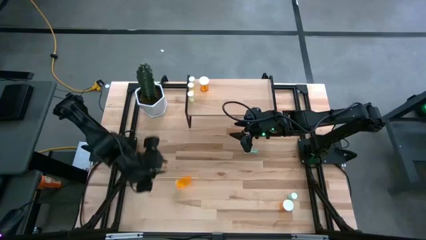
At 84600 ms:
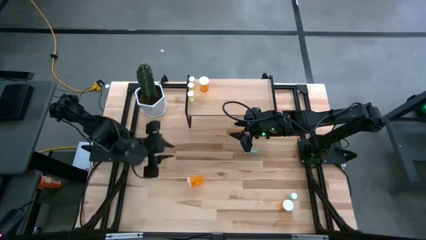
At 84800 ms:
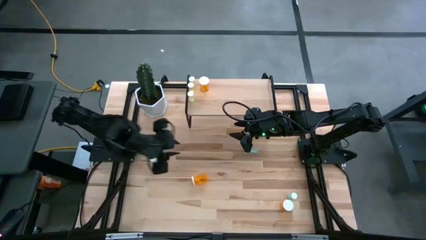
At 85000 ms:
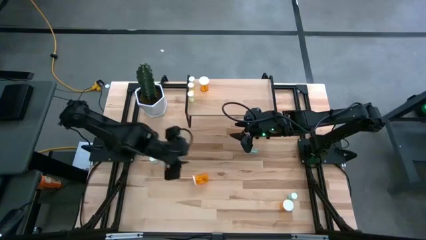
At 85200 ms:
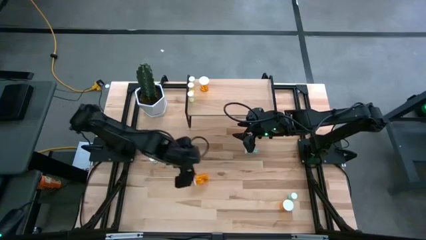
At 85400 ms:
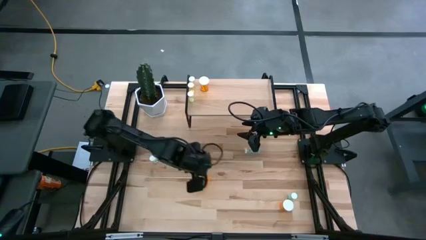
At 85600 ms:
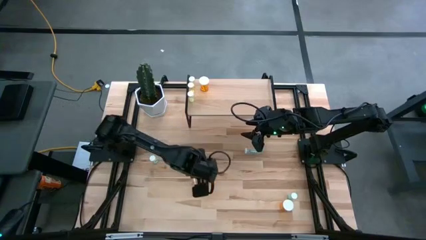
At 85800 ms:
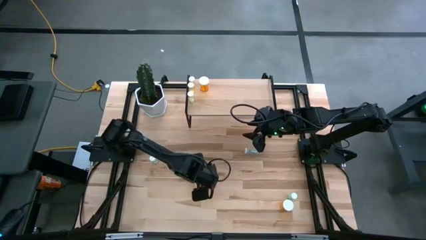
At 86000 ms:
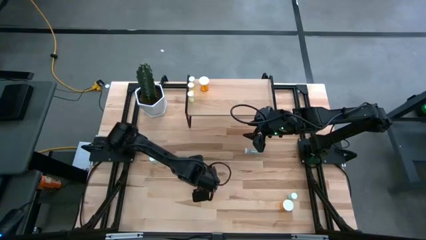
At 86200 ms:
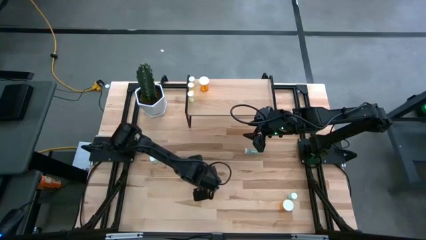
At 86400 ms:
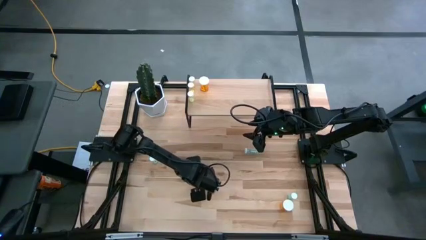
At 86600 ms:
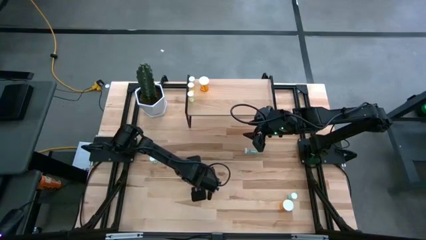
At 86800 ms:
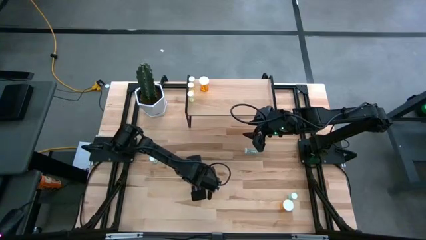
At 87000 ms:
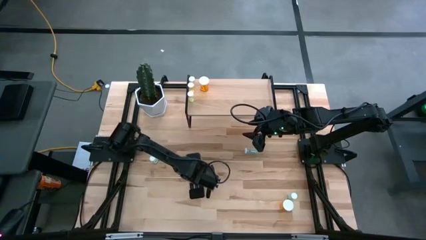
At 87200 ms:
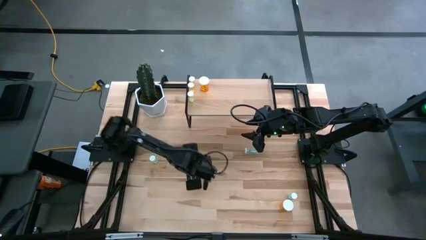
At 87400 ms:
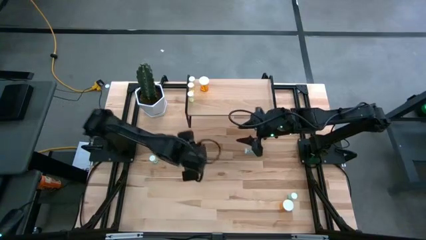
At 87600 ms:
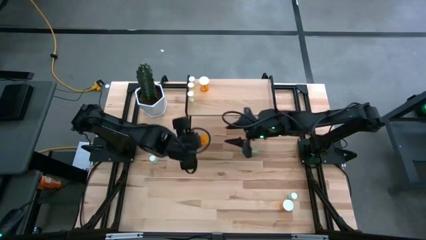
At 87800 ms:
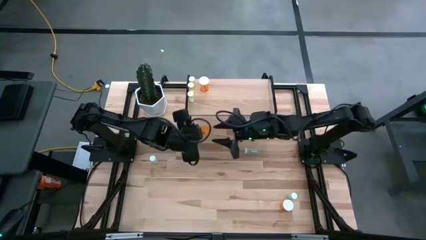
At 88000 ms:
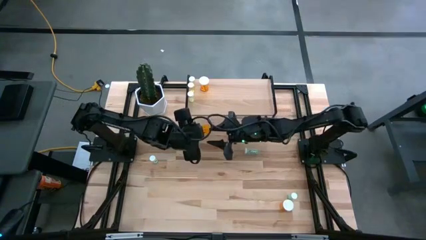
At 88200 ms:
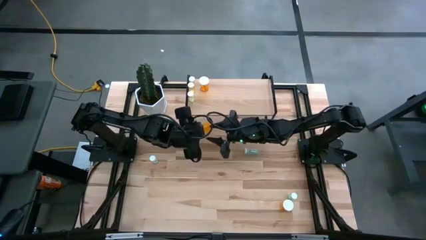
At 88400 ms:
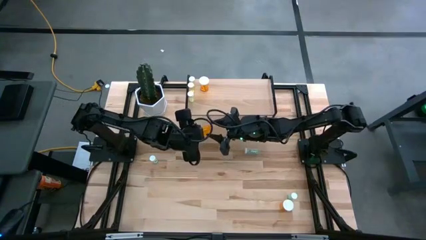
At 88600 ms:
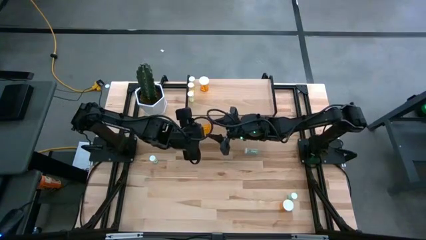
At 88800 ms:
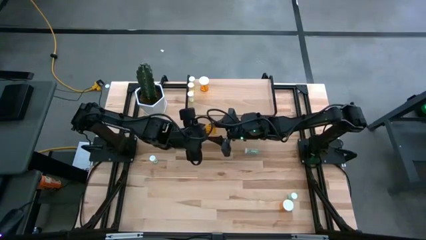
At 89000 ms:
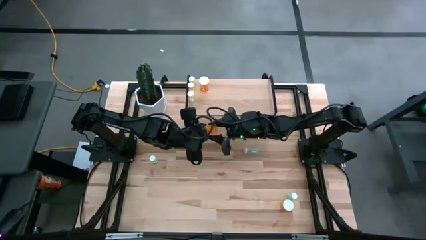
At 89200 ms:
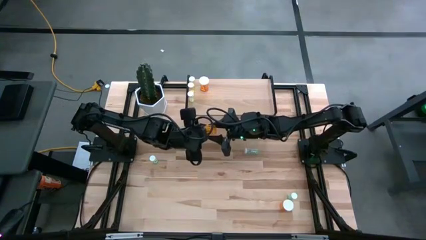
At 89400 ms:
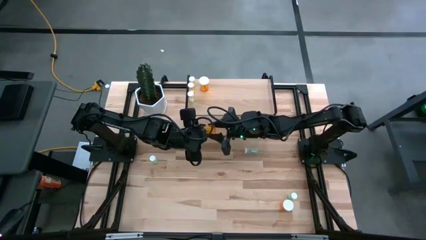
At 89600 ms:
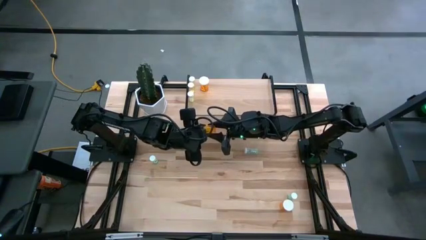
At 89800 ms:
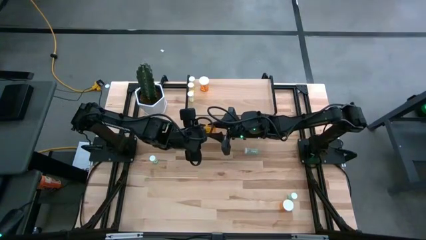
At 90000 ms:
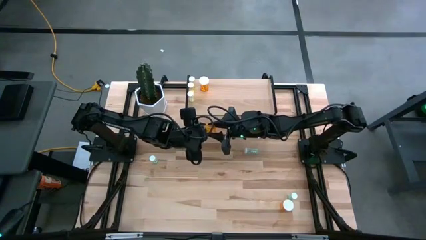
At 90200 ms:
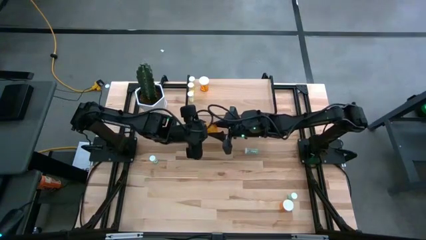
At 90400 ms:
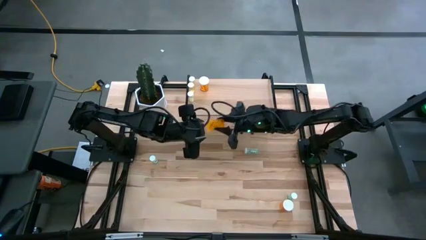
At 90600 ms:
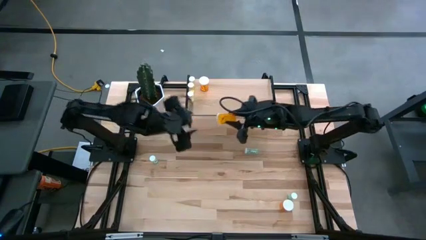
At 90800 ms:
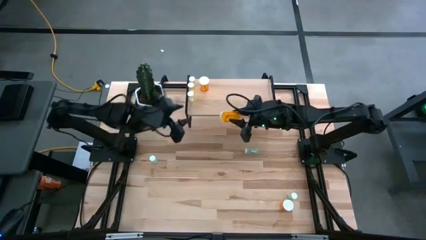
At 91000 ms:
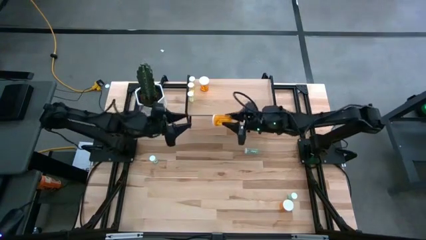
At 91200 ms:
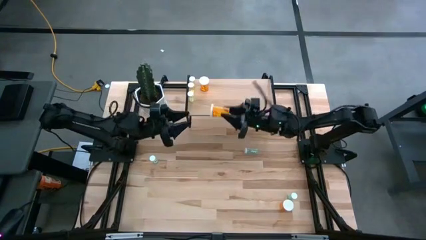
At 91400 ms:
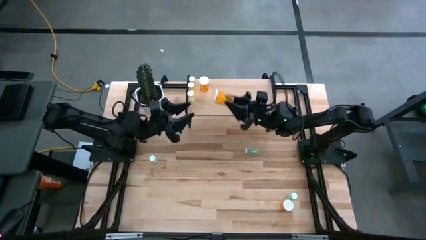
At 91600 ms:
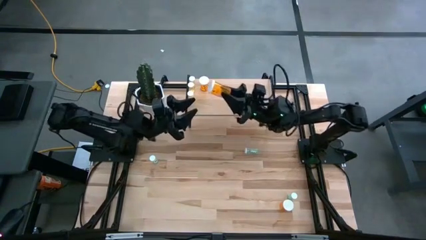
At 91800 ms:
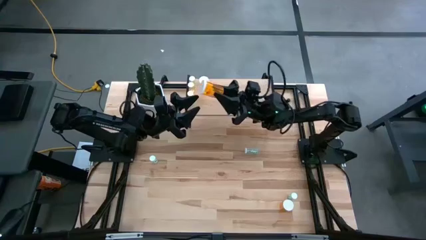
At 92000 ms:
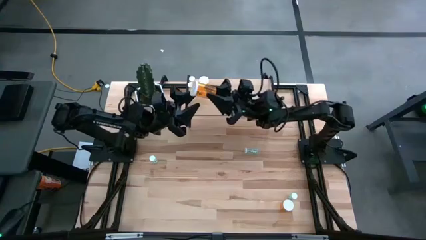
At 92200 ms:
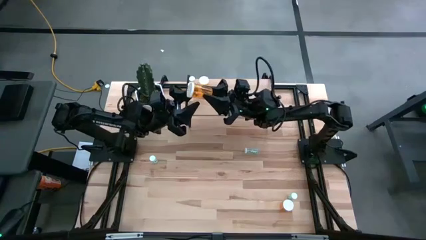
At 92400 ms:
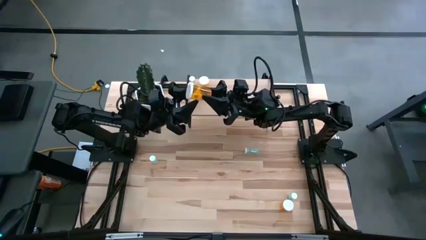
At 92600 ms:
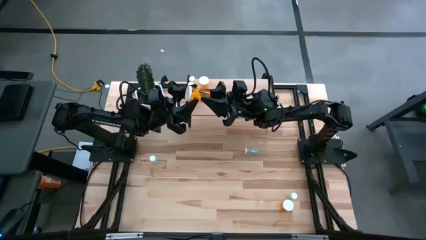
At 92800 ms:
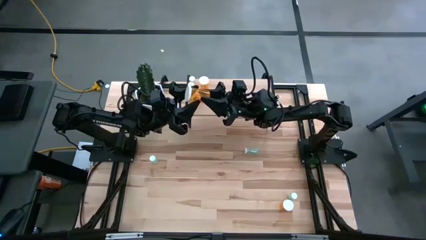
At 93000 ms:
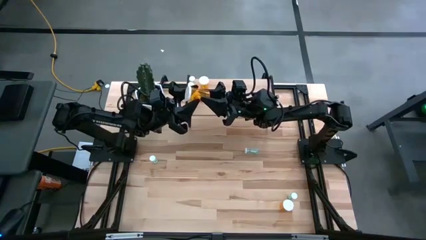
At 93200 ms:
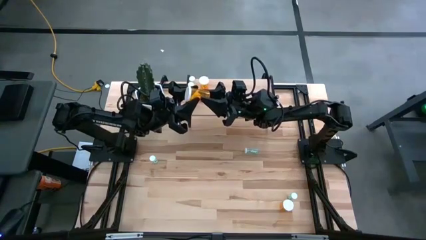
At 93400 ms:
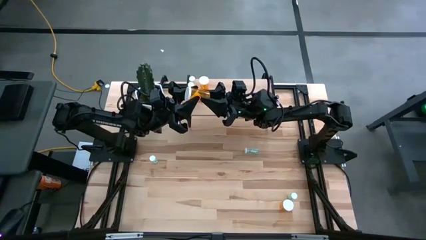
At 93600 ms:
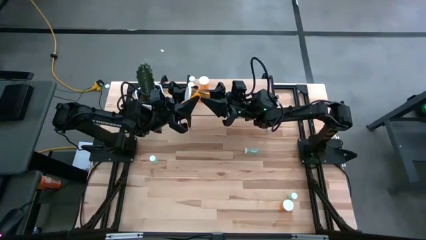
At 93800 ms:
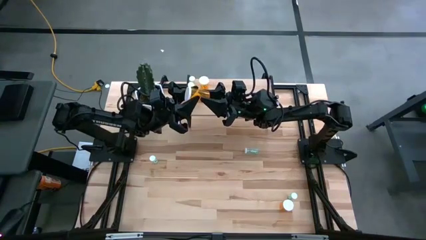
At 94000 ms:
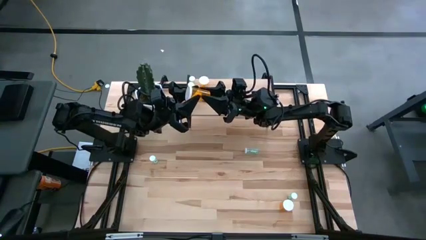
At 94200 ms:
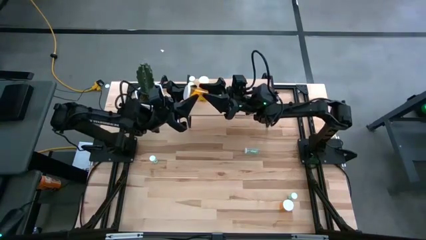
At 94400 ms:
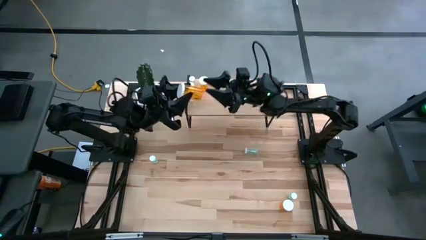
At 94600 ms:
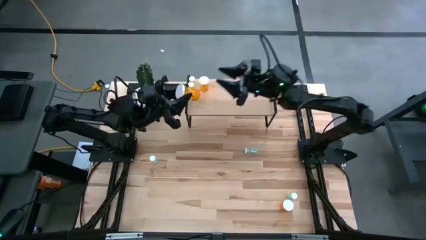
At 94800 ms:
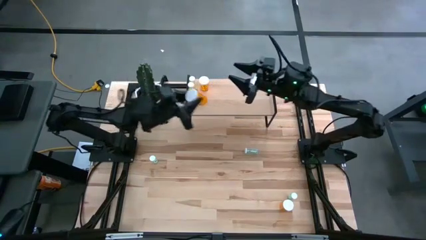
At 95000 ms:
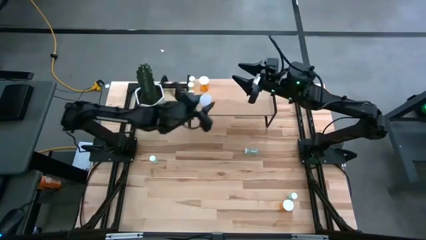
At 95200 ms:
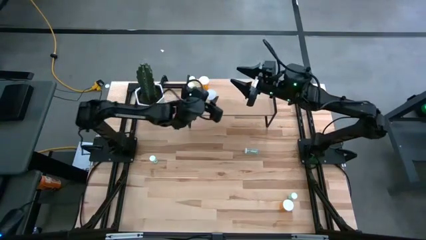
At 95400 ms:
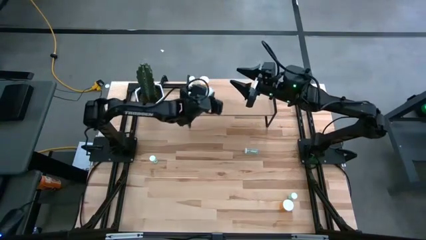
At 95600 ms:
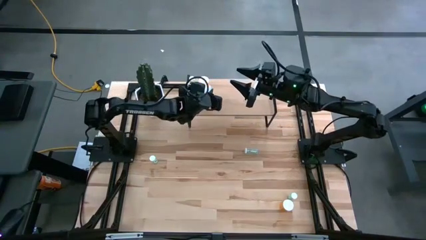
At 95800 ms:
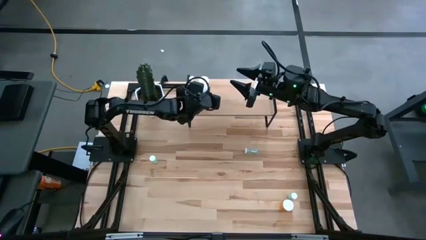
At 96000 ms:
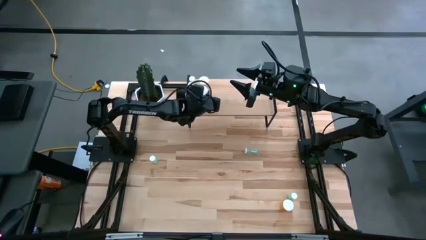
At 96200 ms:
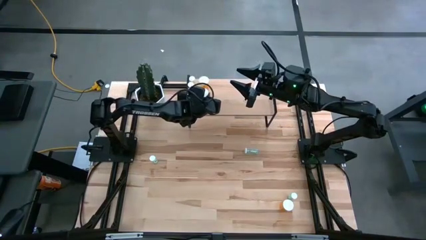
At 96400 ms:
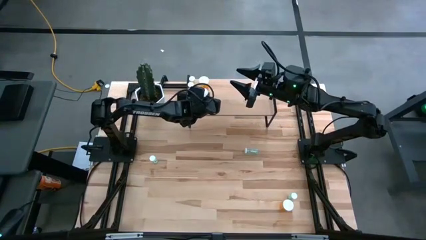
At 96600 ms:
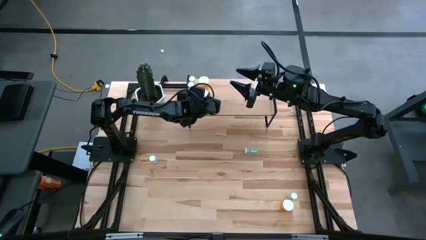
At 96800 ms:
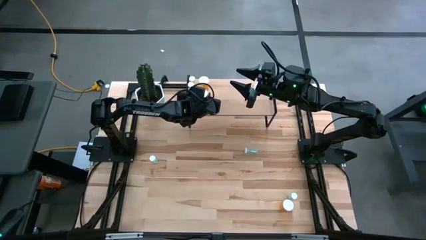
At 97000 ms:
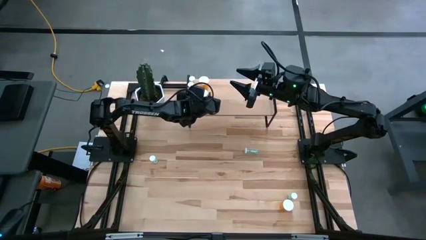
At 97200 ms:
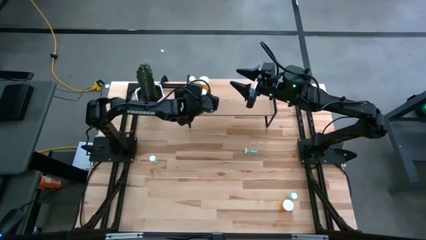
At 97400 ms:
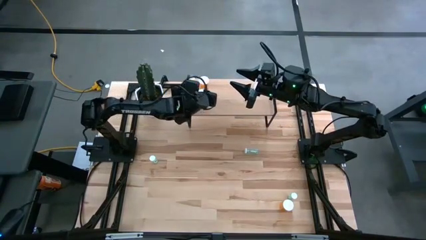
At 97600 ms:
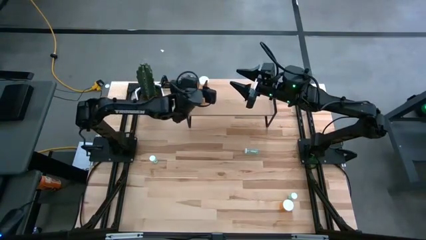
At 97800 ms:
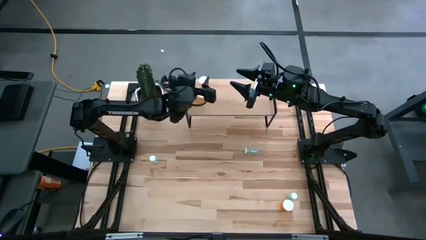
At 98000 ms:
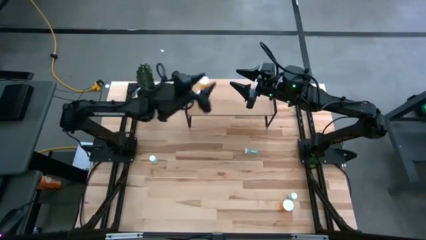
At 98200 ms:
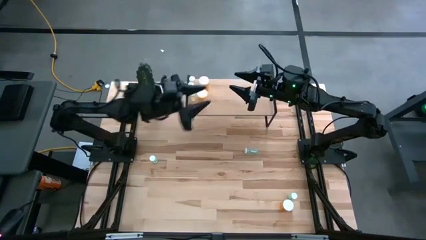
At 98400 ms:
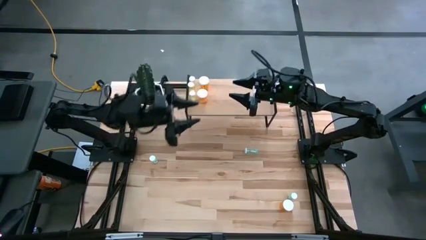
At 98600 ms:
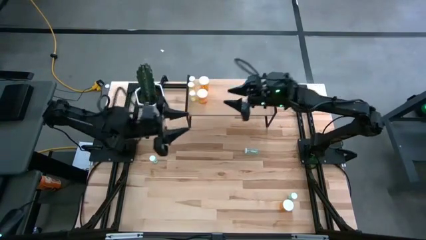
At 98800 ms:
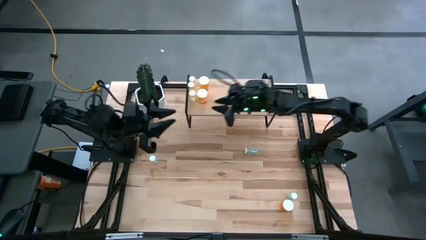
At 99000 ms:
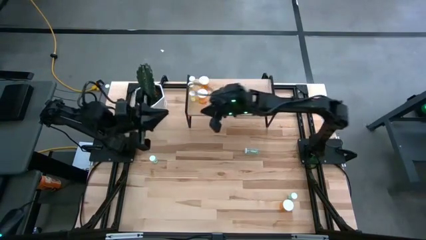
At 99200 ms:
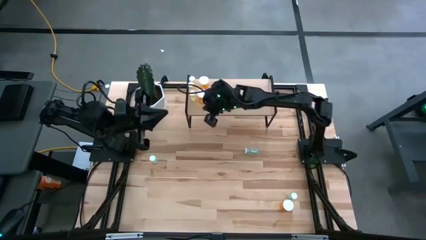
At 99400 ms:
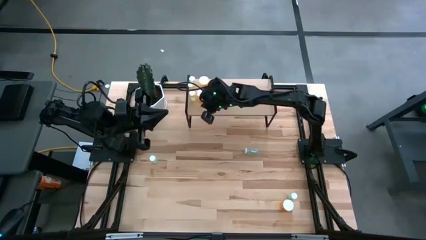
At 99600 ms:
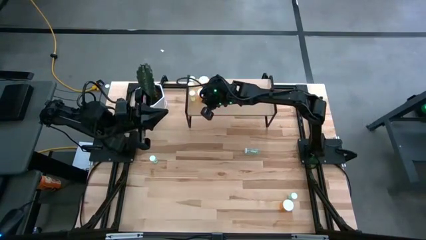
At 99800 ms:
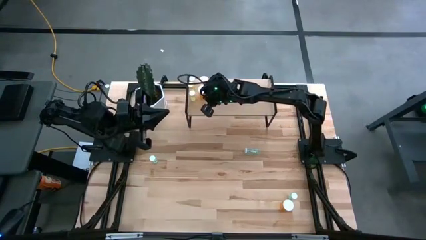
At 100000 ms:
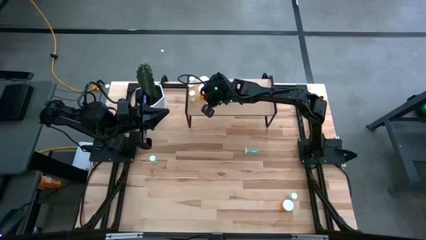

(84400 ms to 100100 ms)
Task: Pick and place medicine bottles onto shelf by color
Align the left orange pill bottle with the other yellow pill bottle on the shelf

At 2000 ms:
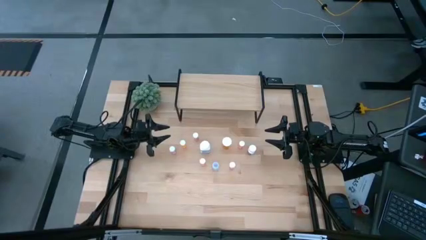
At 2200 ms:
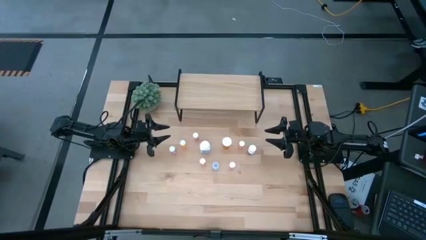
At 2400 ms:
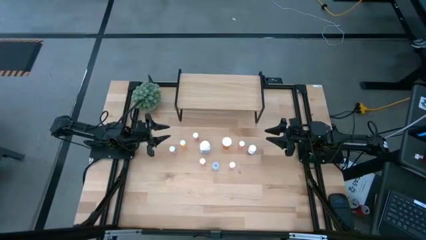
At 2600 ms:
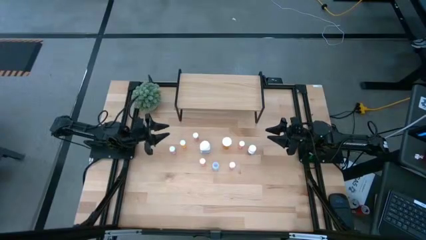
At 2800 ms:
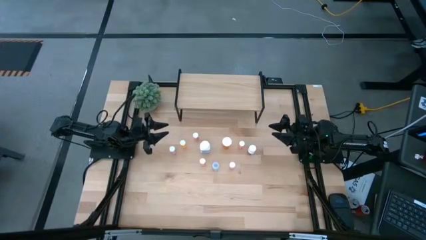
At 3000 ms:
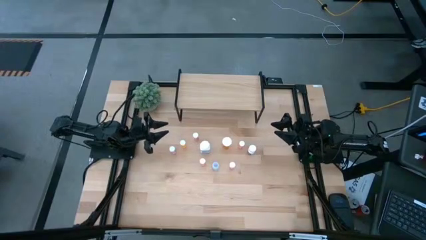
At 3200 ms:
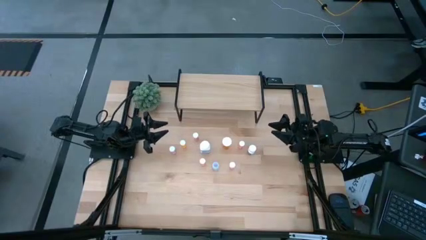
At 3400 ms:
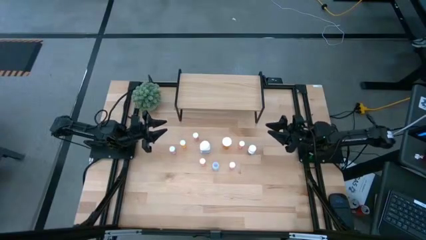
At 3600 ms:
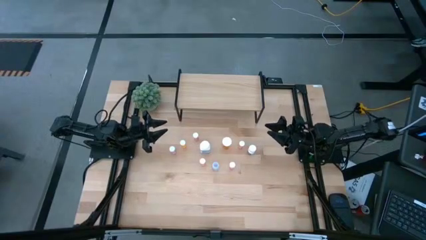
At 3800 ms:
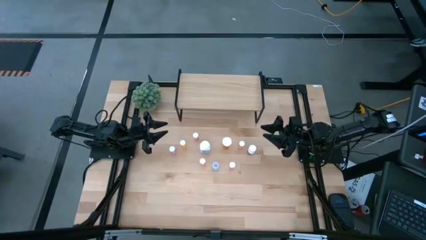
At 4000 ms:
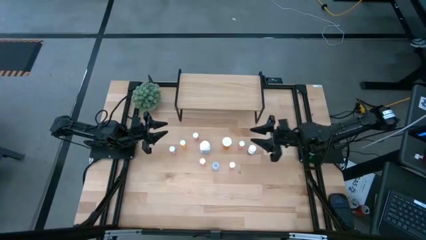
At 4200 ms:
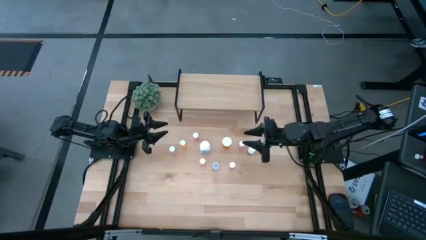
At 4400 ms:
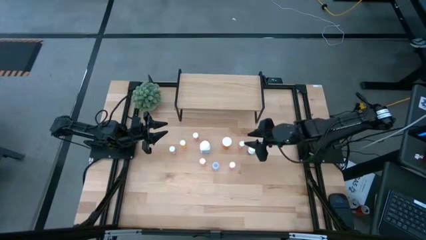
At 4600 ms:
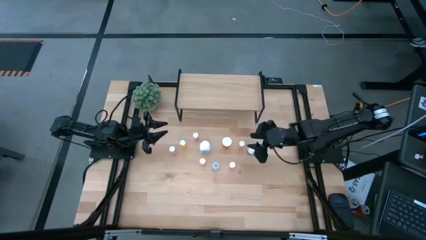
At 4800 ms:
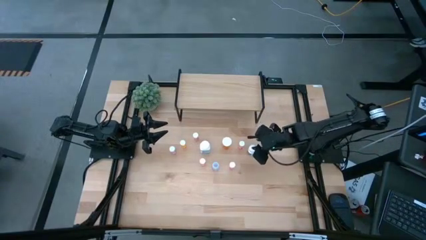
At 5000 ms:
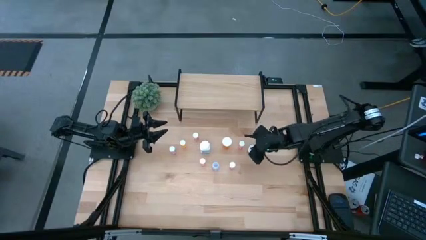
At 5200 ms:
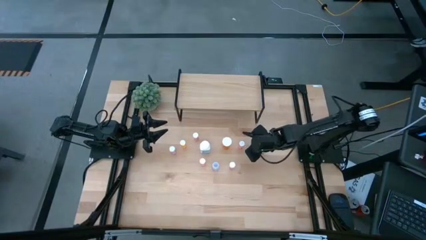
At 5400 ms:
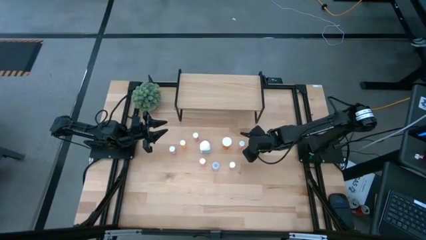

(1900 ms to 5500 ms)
Task: Pick and place medicine bottles onto shelf by color
Put the white medicine bottle on the shelf
